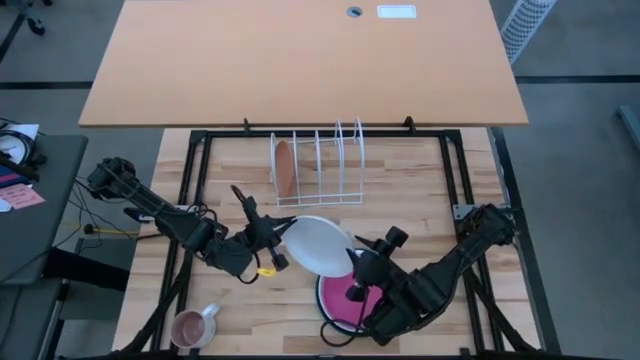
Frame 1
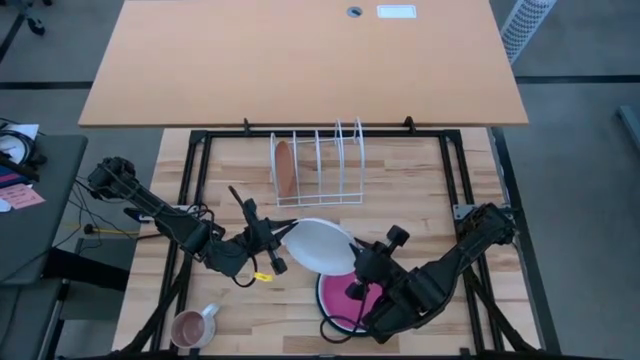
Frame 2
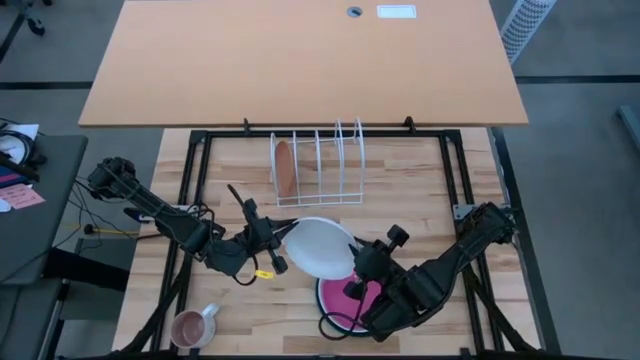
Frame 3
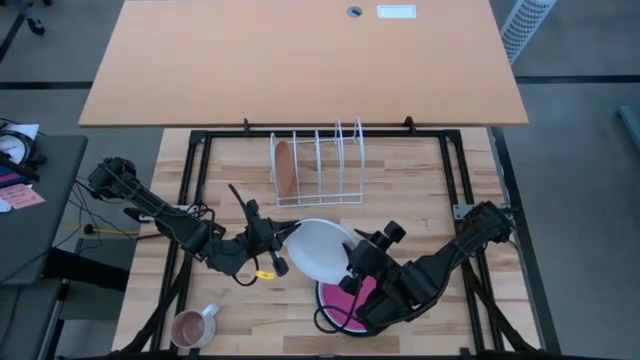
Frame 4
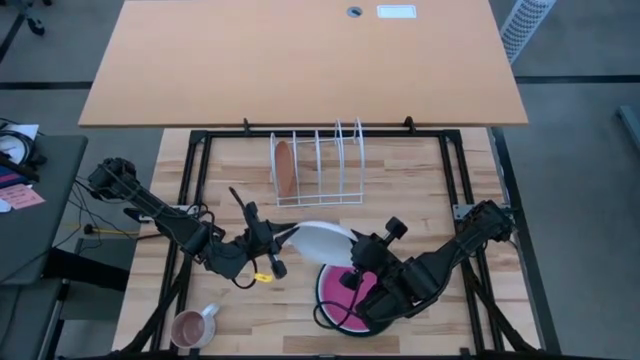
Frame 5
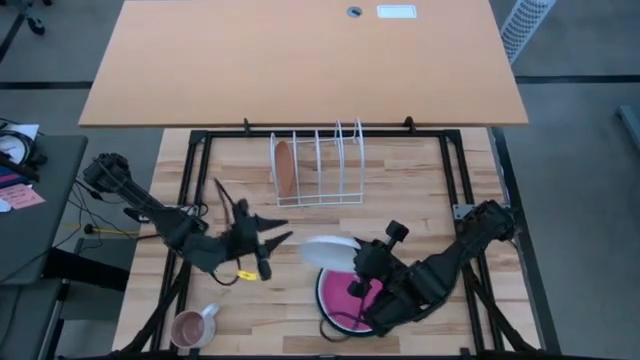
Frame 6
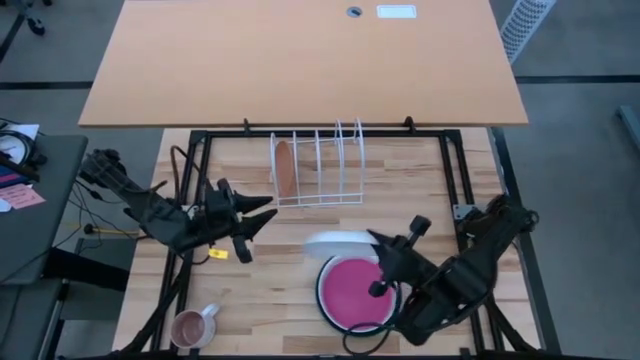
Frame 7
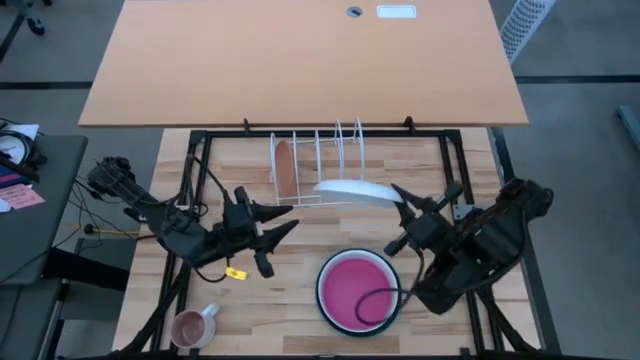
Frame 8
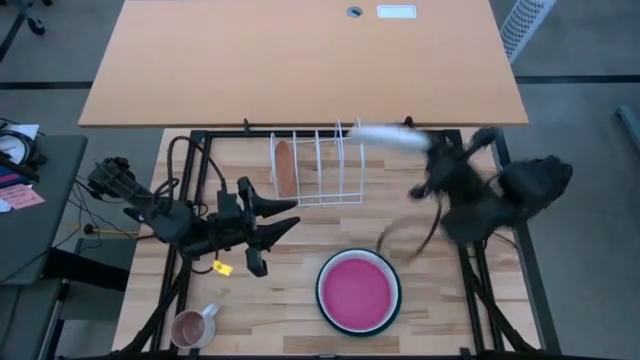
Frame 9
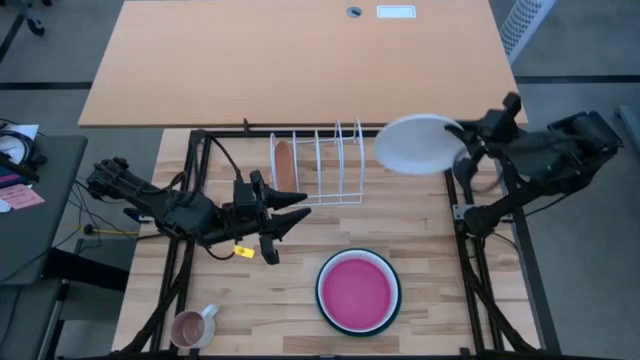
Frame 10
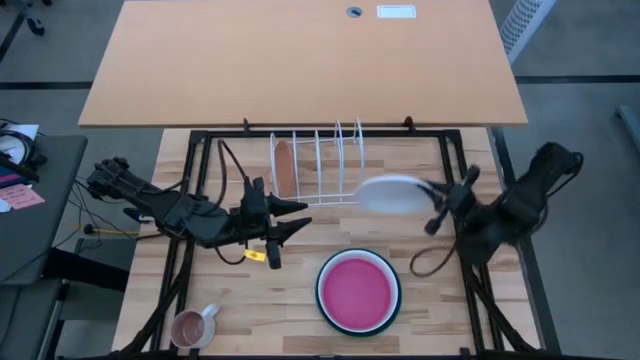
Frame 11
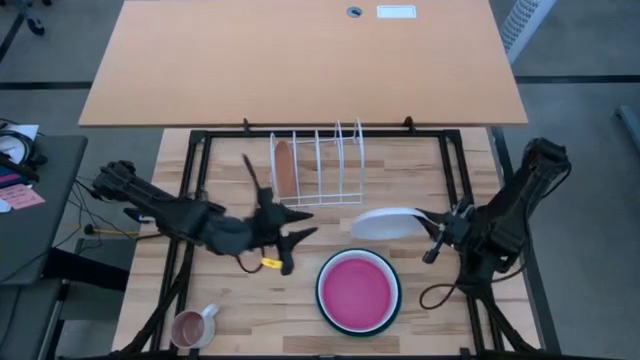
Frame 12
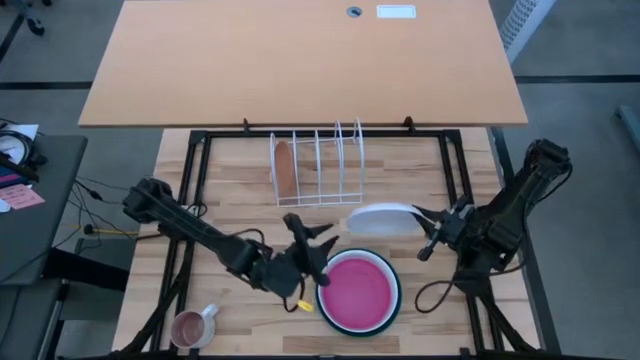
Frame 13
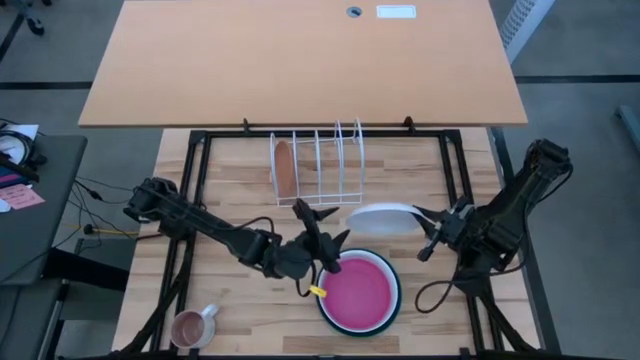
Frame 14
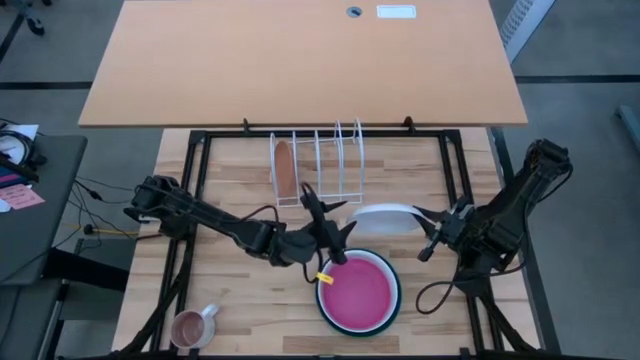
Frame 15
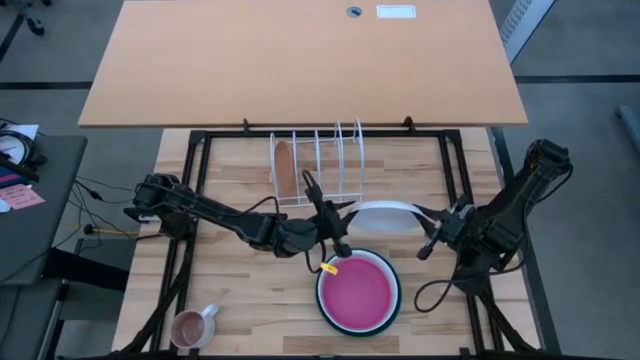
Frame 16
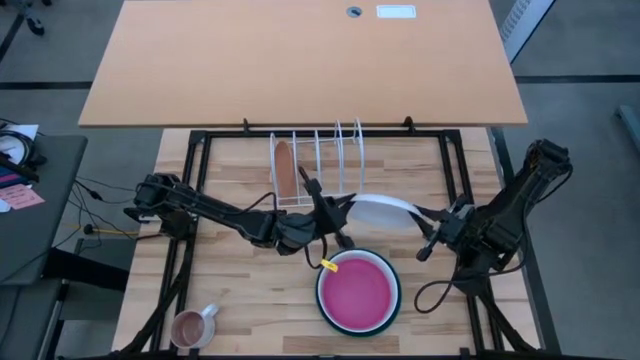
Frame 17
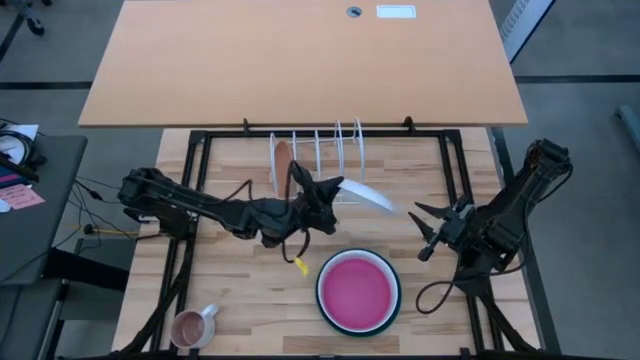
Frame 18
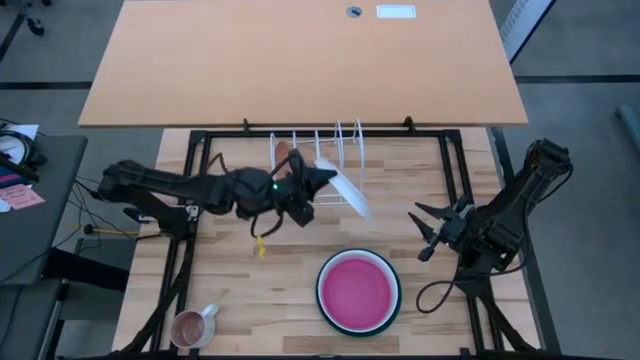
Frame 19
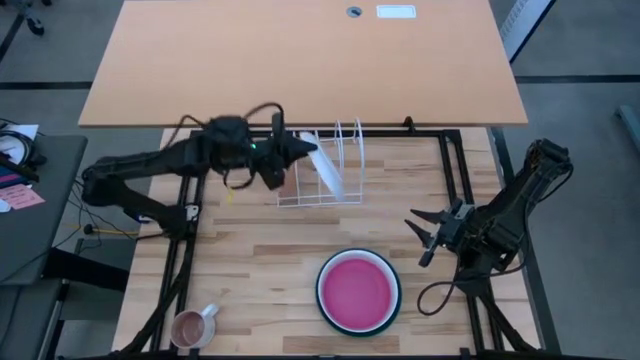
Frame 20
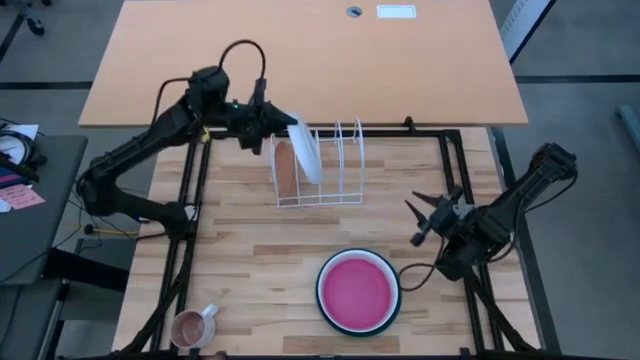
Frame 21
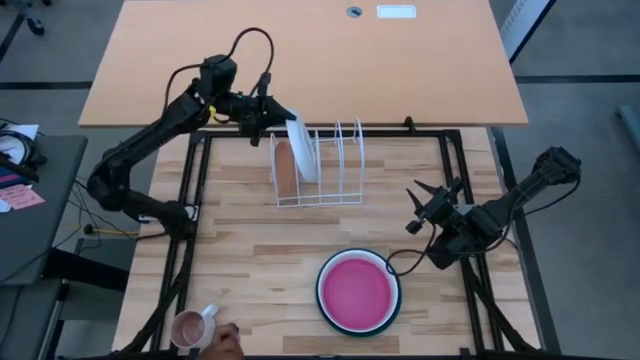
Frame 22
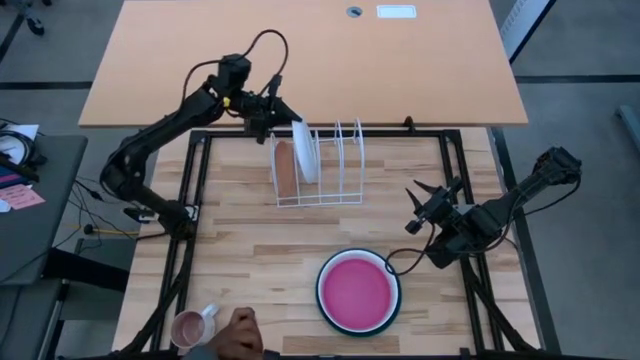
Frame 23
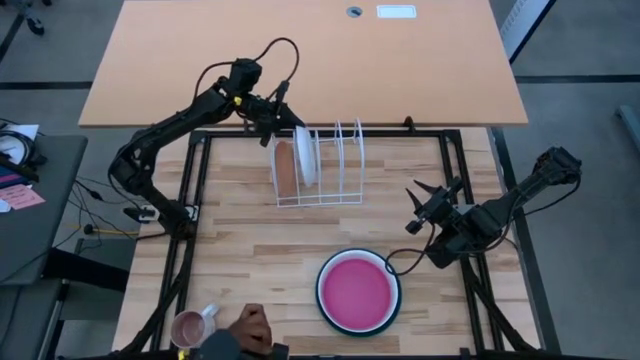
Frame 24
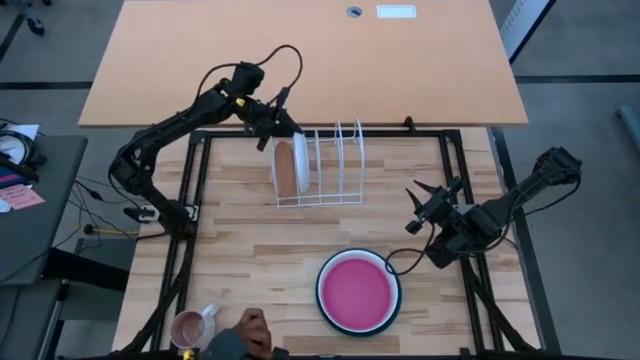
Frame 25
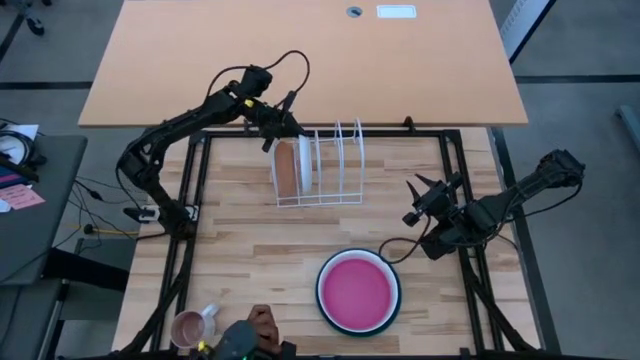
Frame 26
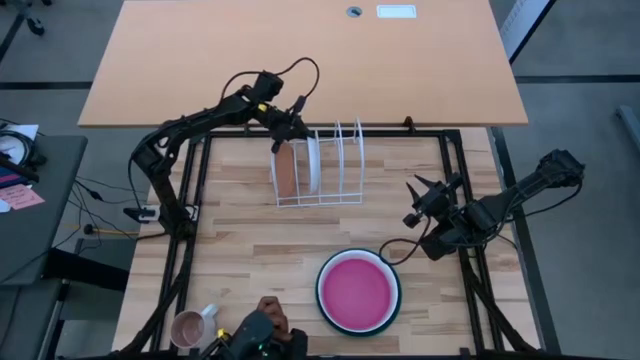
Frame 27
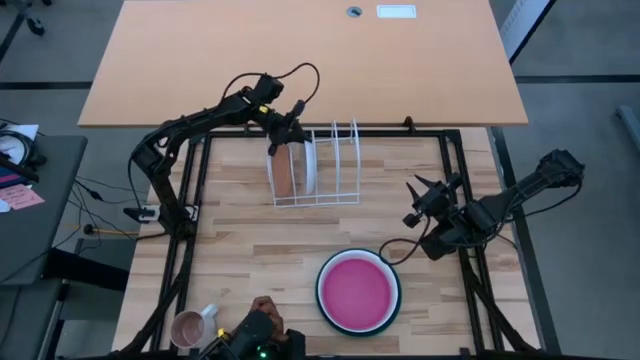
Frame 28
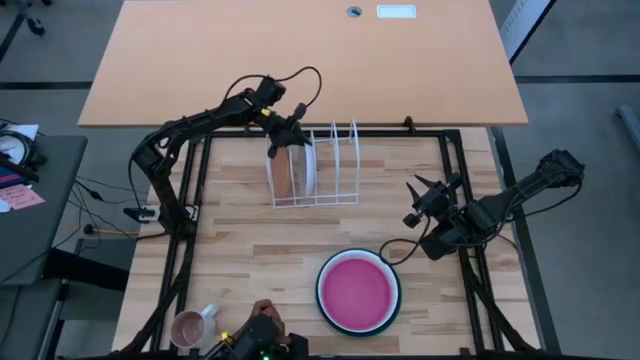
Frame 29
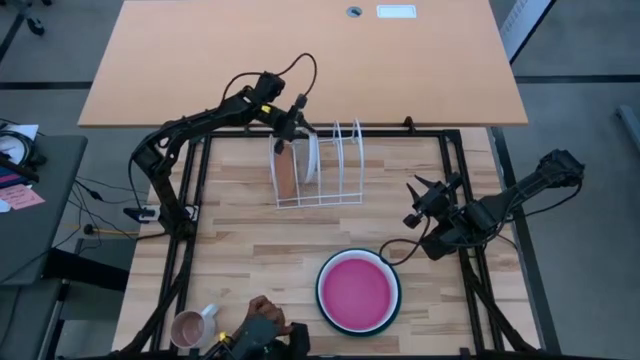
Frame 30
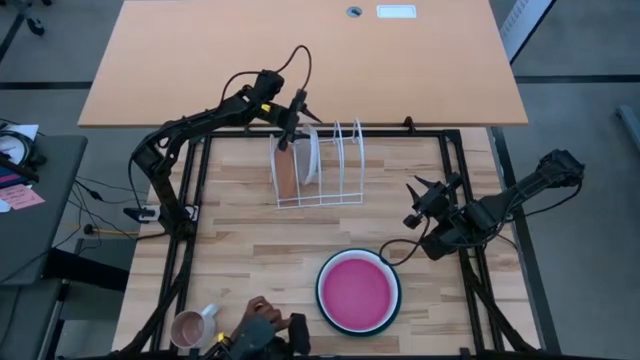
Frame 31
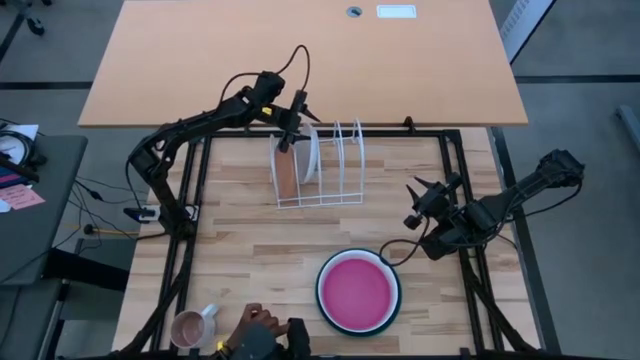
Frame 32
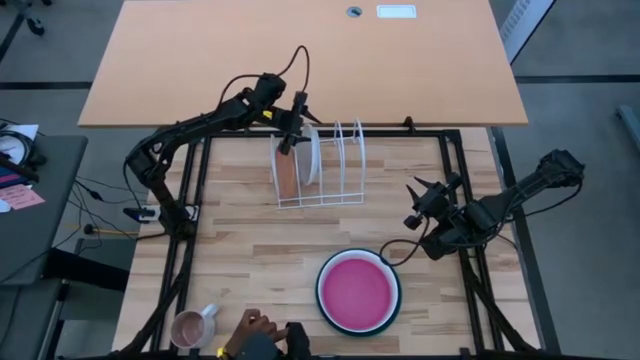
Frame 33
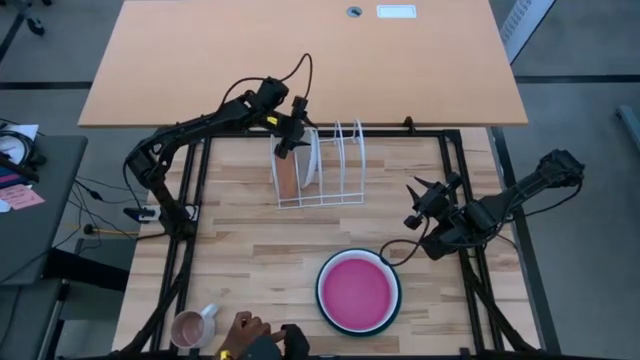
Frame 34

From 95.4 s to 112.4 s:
Task: Sort dishes
Put the small white plate in the dish rack

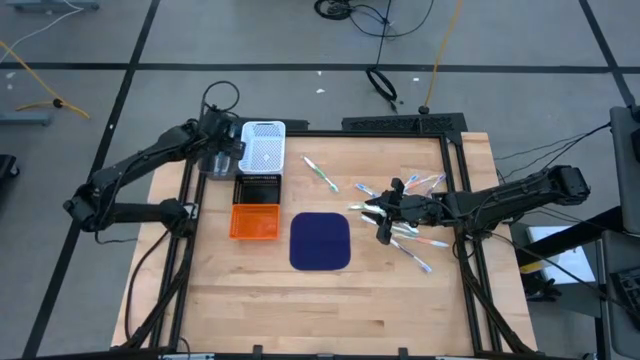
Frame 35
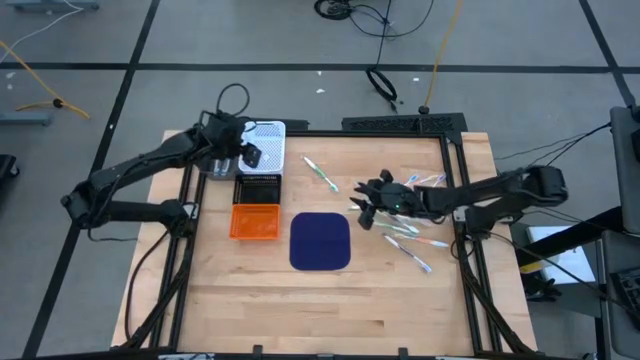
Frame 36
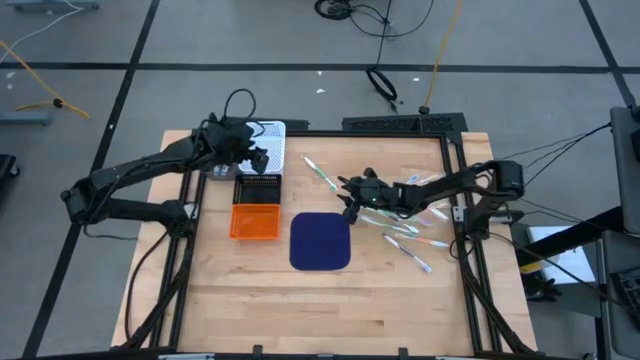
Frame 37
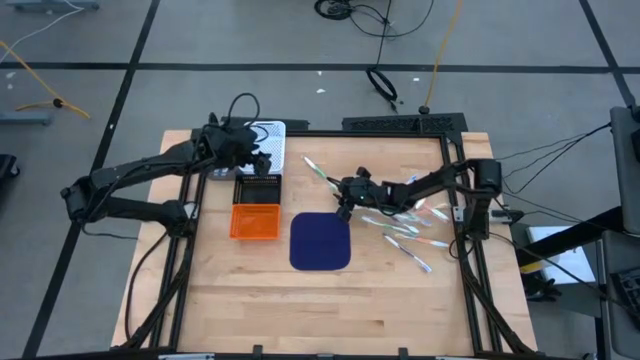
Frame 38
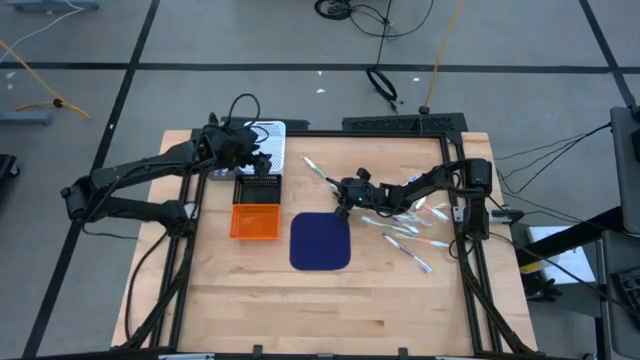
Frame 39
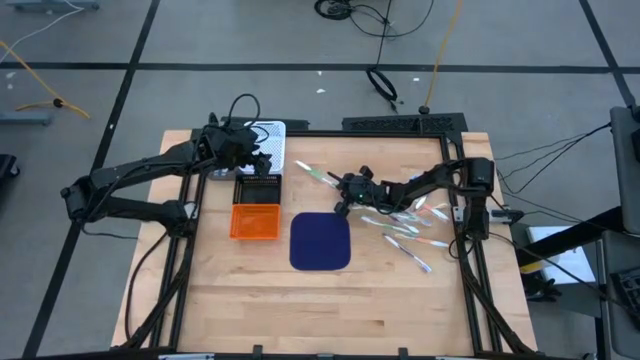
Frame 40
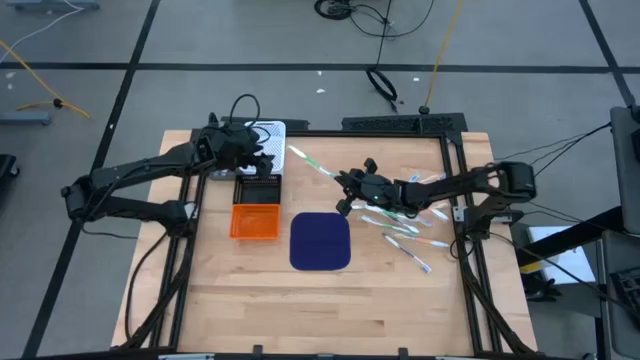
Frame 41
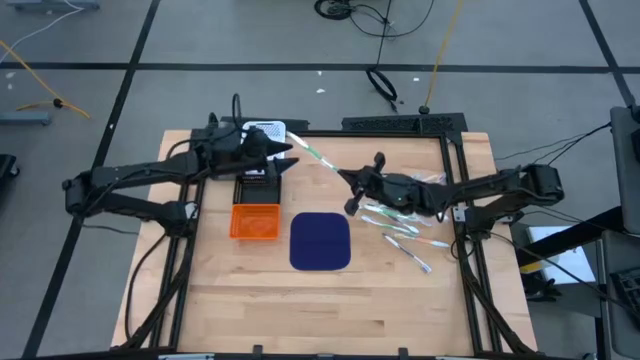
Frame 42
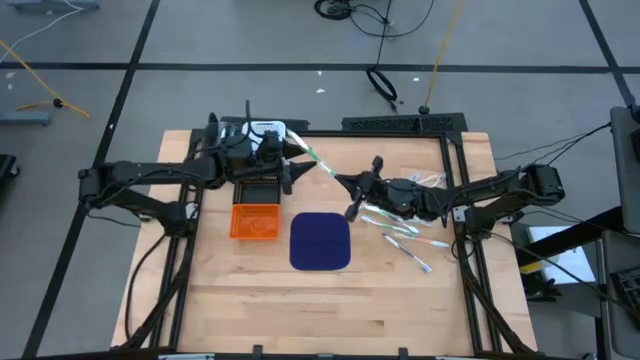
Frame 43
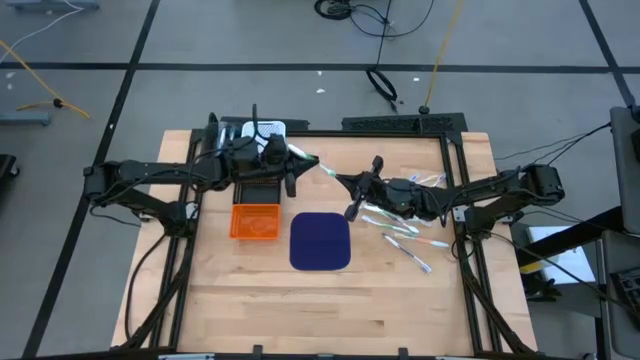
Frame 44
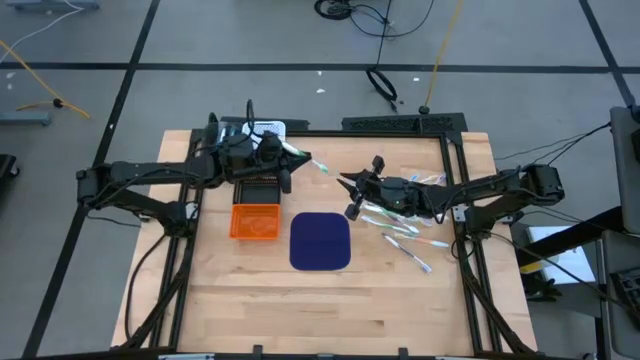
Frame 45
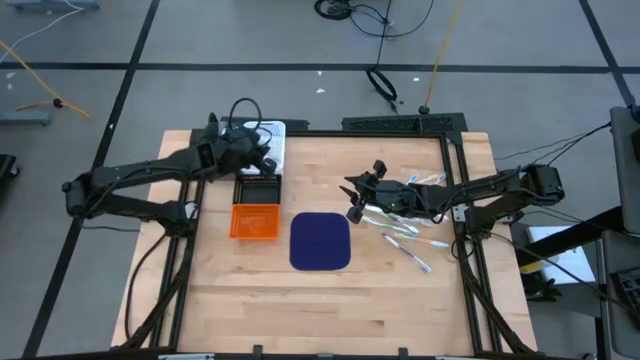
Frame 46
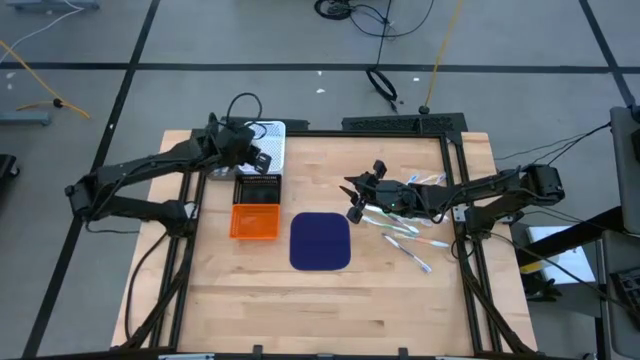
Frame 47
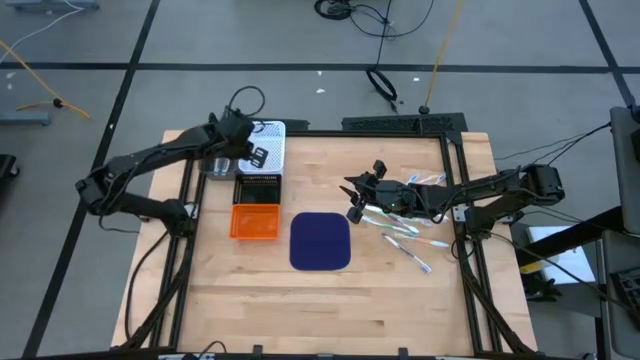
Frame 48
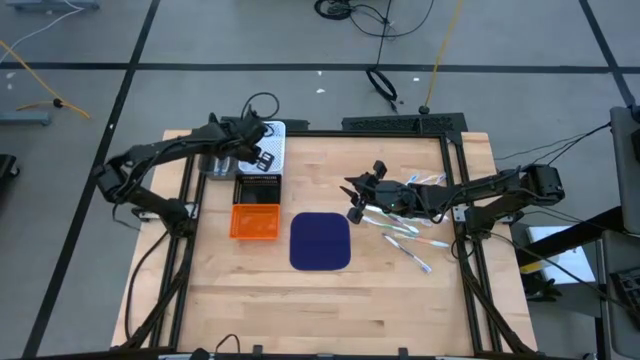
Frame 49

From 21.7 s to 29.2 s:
Task: Pick & Place Toothbrushes
Put the green toothbrush into the white bin
